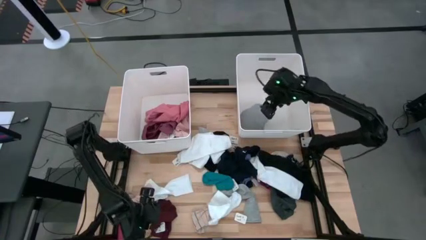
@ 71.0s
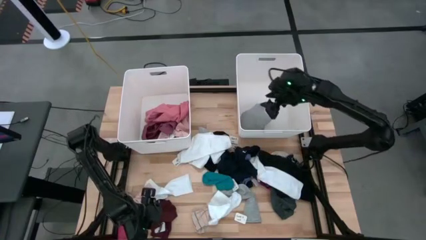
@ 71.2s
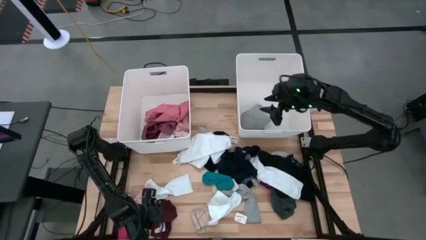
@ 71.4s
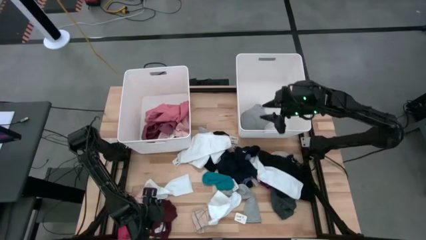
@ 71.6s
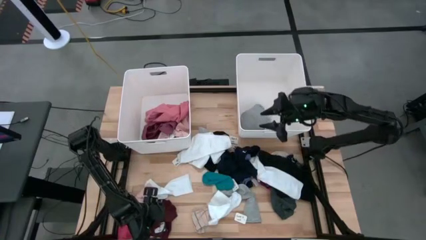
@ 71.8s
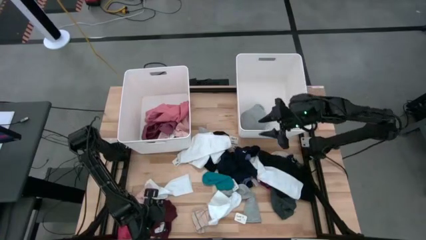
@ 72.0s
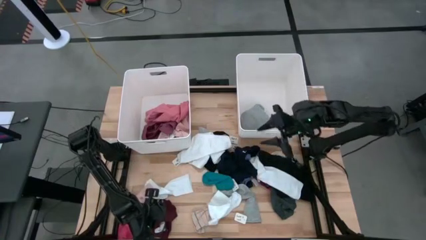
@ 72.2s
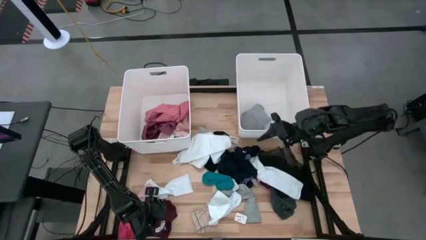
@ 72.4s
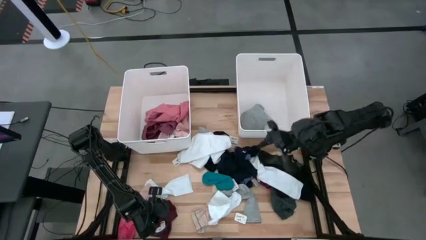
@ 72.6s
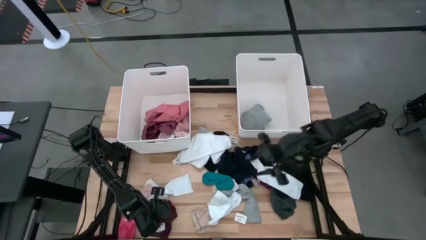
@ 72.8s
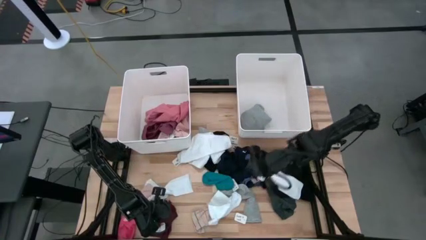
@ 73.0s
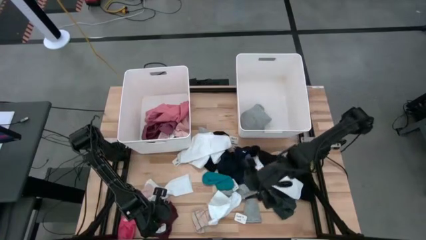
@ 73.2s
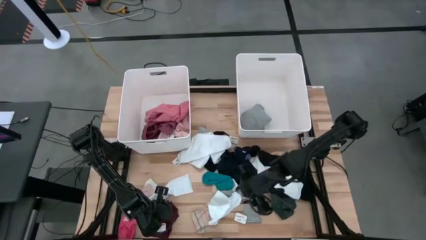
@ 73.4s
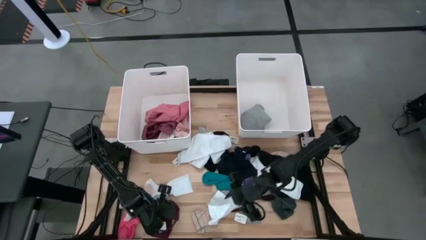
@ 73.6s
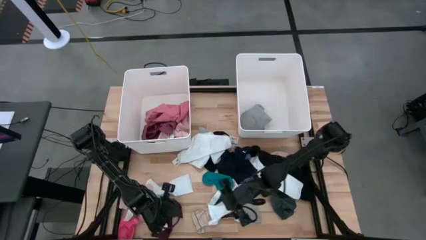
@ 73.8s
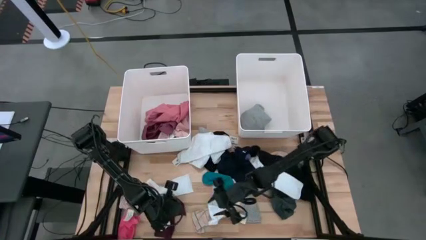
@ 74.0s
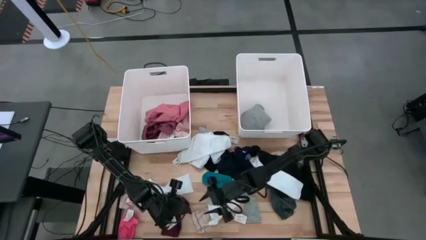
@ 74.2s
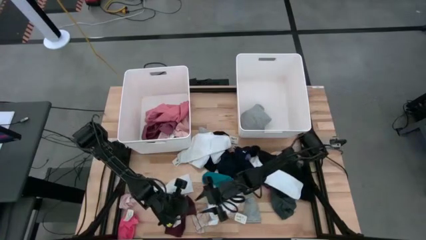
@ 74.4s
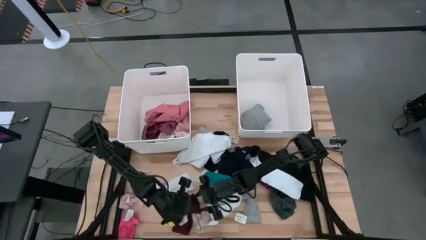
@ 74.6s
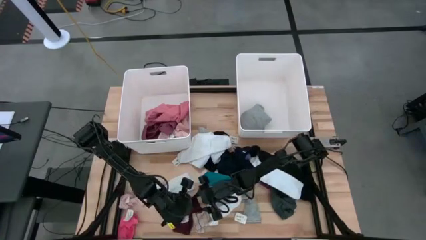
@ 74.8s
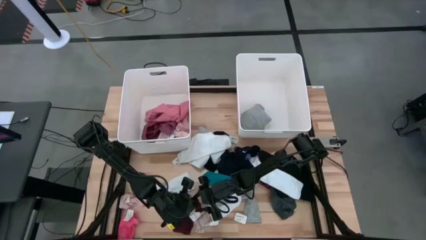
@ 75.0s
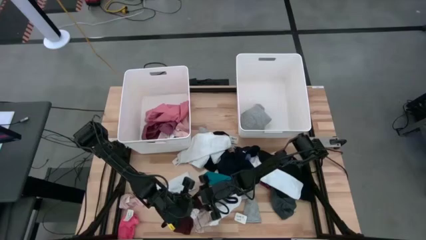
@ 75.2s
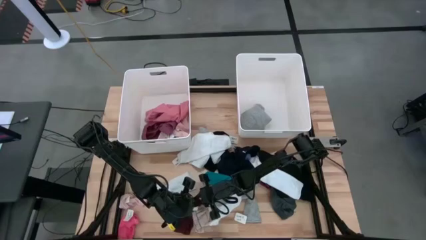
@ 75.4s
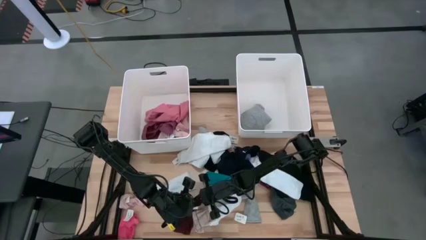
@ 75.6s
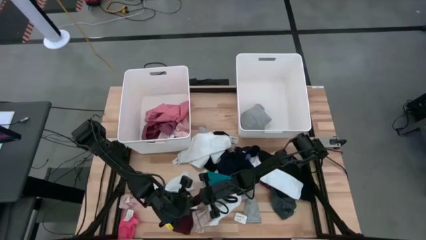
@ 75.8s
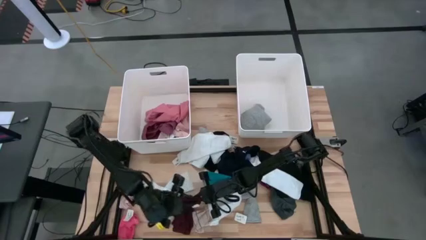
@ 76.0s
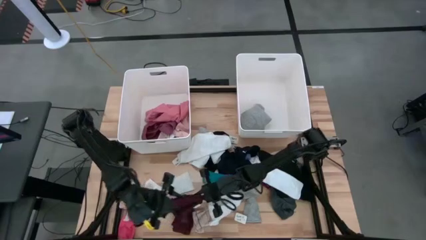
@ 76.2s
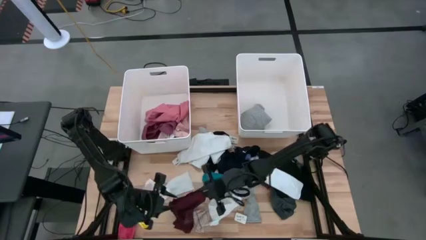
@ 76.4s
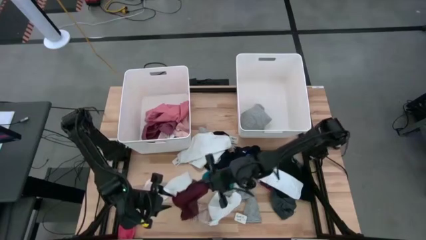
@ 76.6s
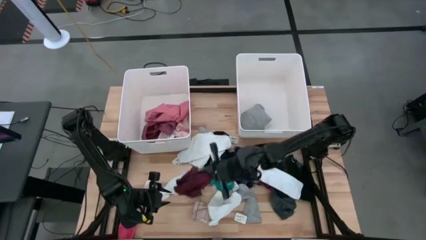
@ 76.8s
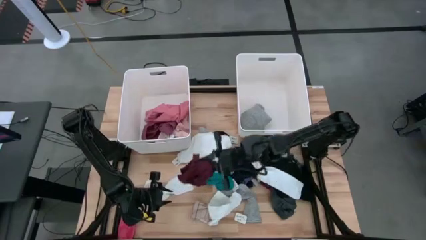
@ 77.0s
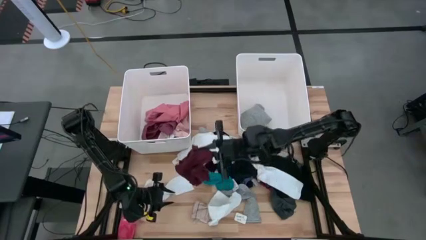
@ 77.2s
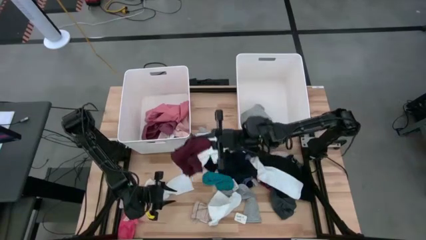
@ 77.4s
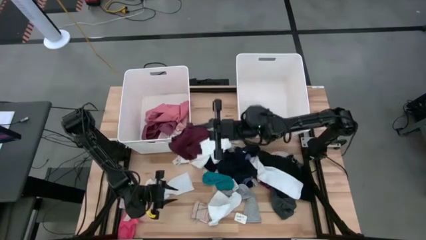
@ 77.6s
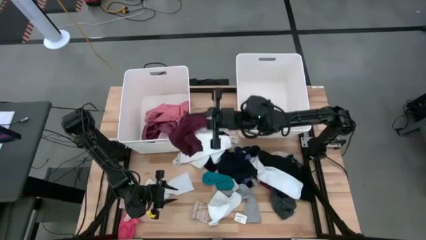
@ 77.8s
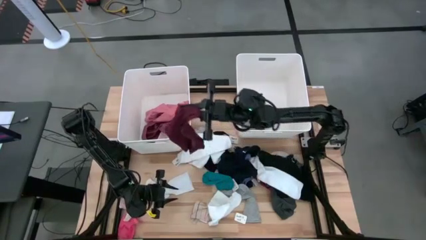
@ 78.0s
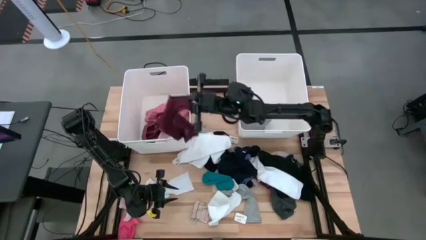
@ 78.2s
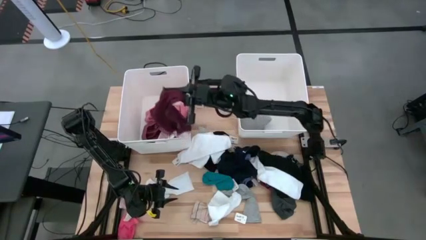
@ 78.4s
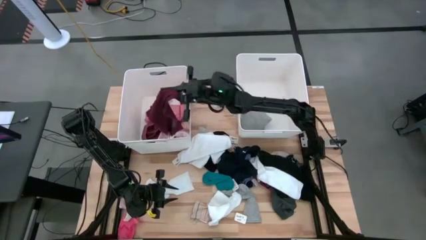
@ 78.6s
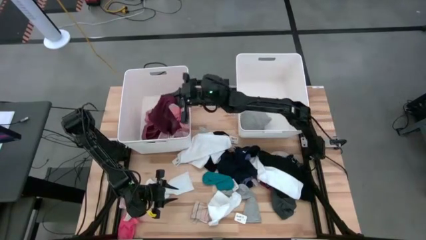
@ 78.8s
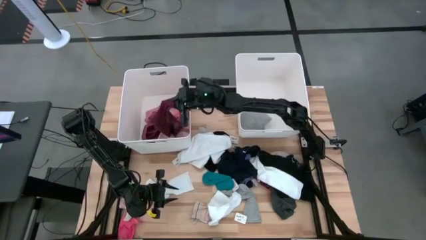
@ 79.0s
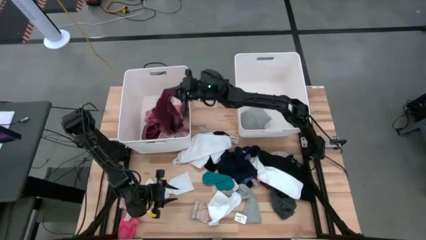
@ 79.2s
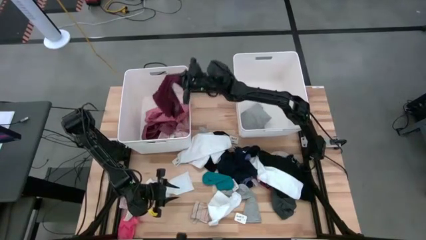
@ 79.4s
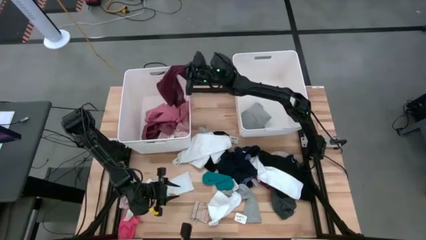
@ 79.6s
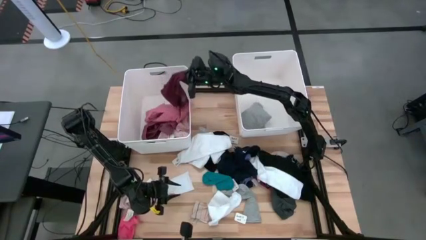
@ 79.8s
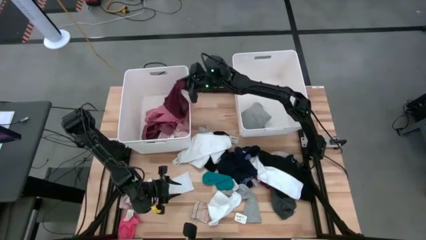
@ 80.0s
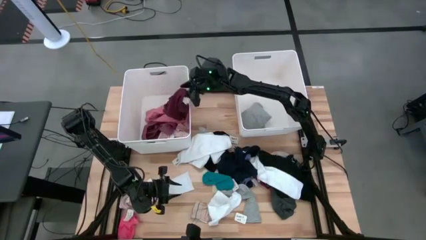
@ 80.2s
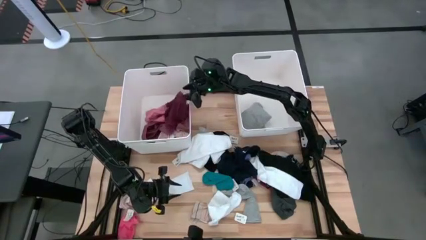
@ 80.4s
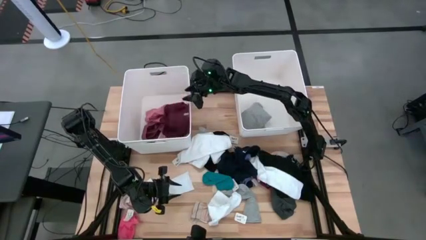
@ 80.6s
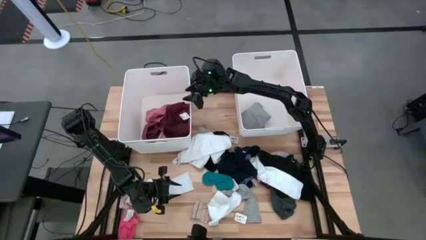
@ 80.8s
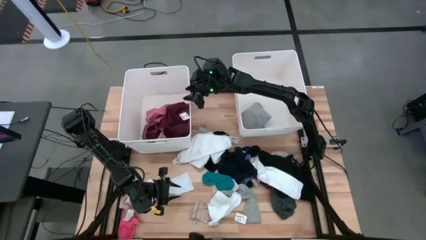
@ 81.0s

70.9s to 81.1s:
Task: Sort clothes
Put the dark red underwear into the left white bin

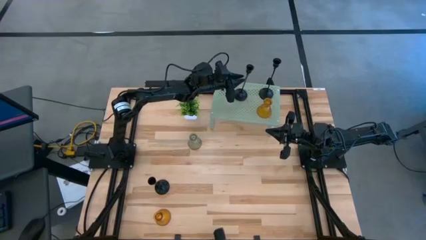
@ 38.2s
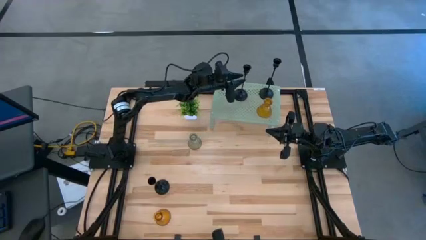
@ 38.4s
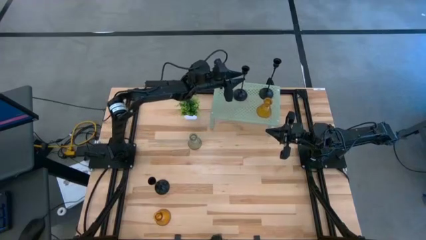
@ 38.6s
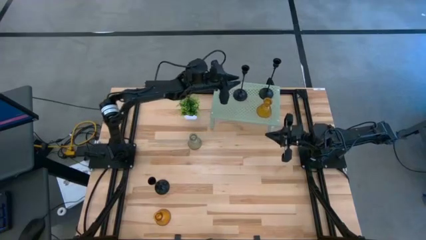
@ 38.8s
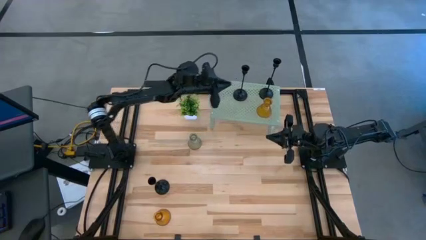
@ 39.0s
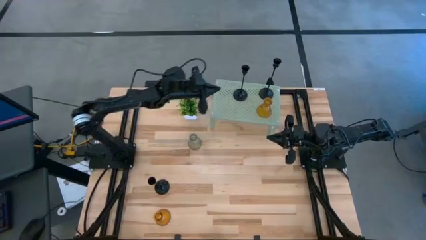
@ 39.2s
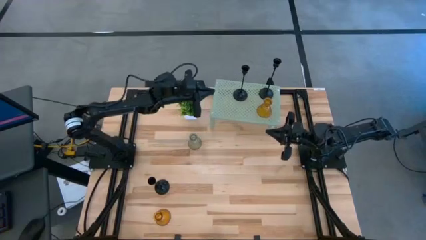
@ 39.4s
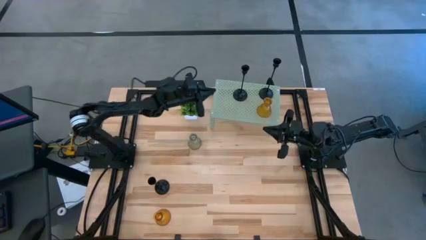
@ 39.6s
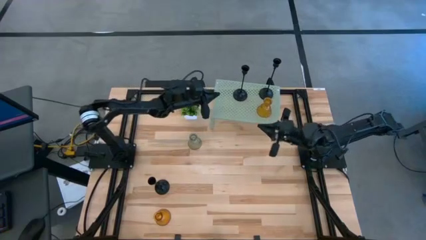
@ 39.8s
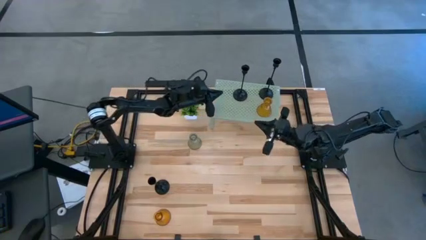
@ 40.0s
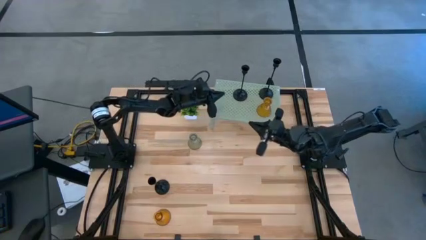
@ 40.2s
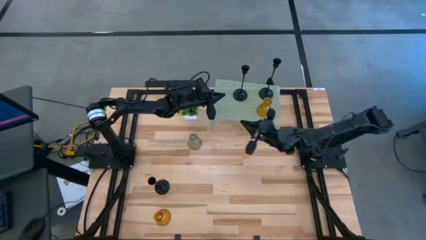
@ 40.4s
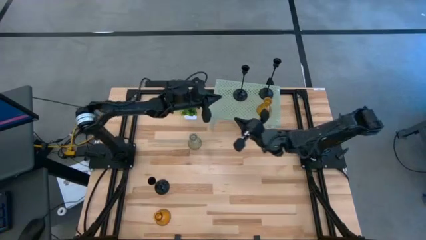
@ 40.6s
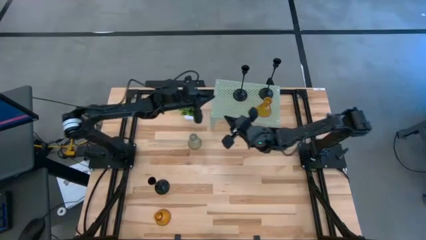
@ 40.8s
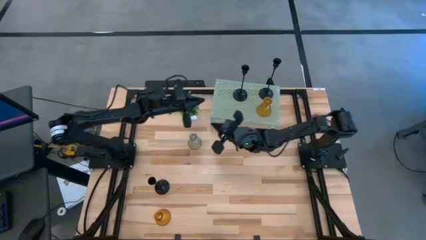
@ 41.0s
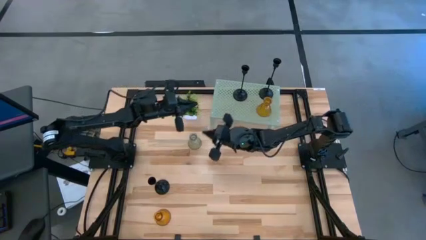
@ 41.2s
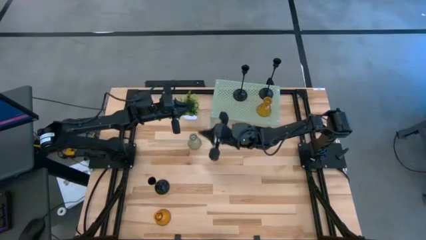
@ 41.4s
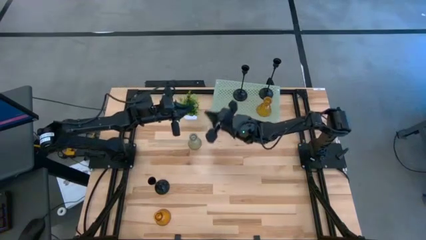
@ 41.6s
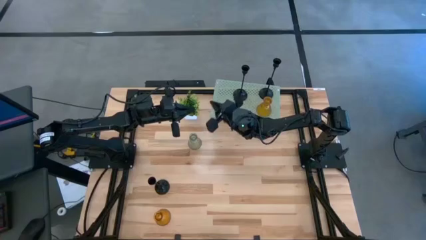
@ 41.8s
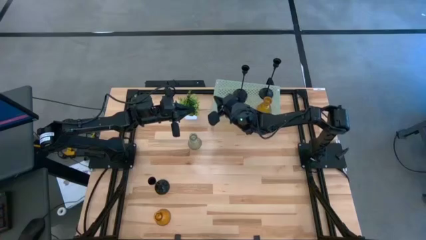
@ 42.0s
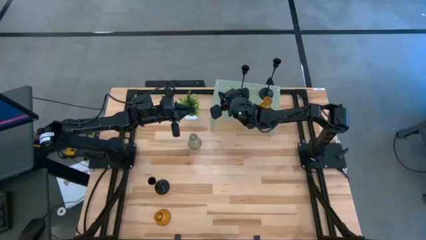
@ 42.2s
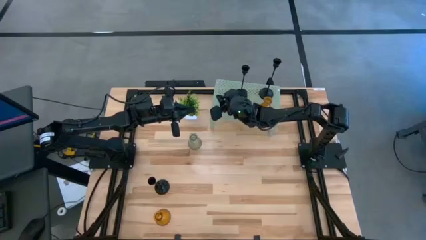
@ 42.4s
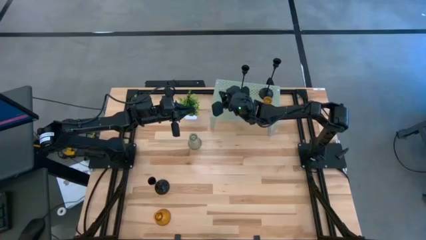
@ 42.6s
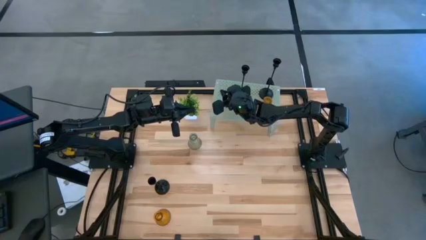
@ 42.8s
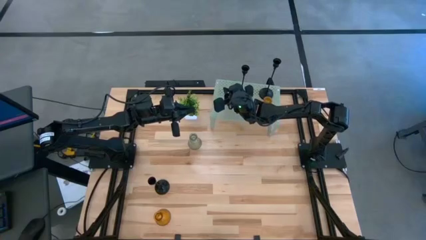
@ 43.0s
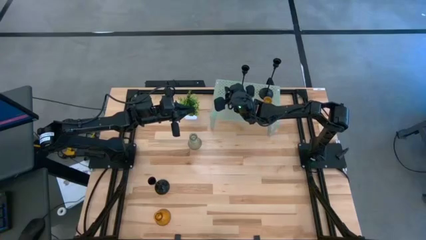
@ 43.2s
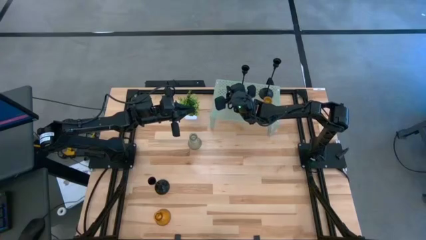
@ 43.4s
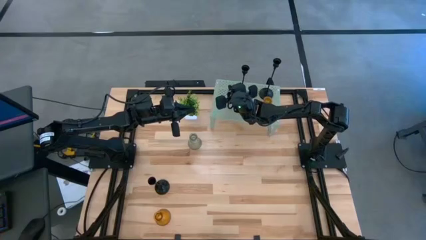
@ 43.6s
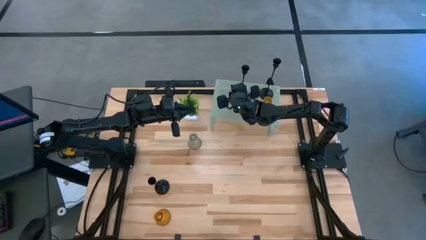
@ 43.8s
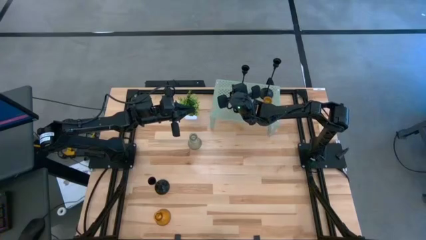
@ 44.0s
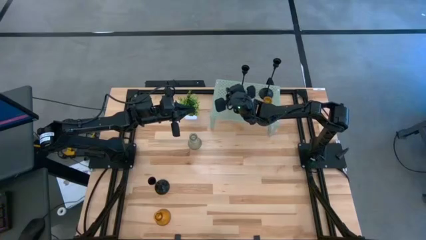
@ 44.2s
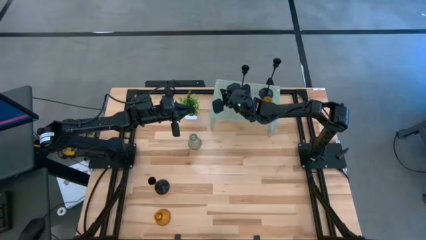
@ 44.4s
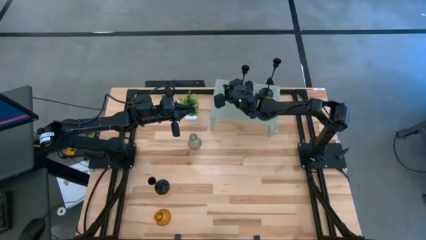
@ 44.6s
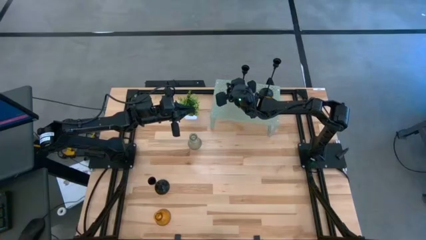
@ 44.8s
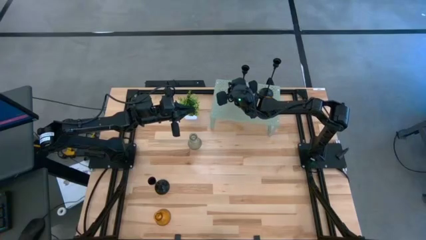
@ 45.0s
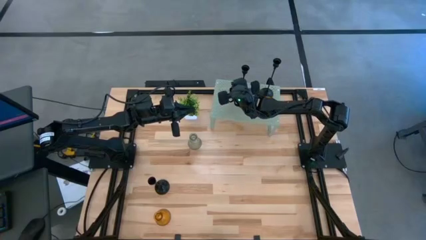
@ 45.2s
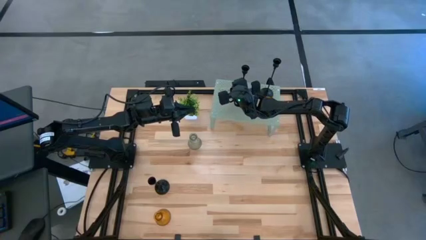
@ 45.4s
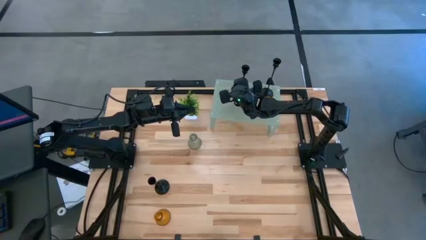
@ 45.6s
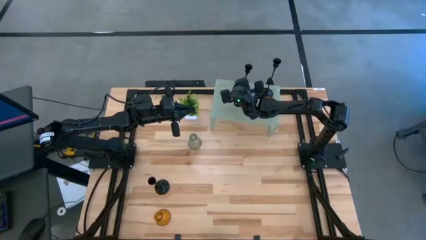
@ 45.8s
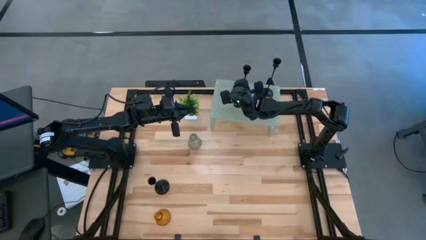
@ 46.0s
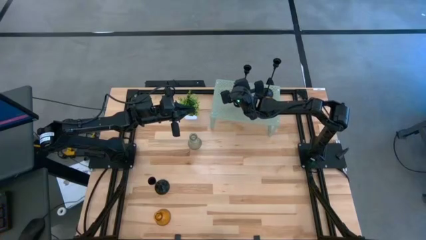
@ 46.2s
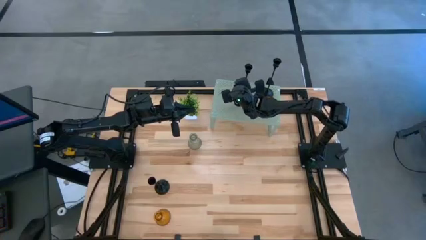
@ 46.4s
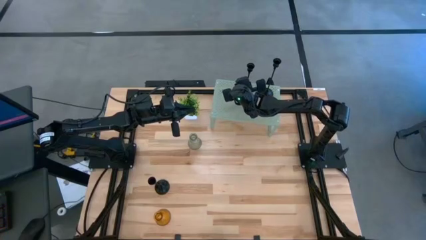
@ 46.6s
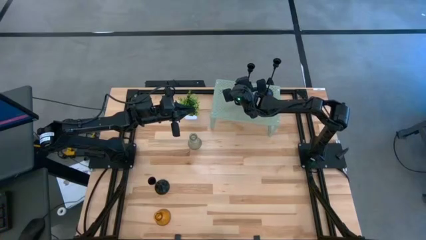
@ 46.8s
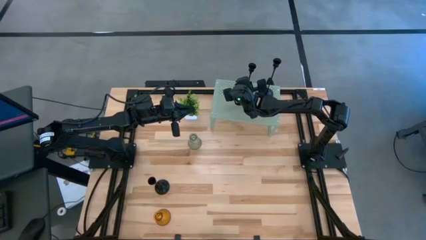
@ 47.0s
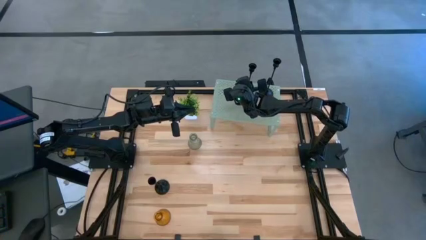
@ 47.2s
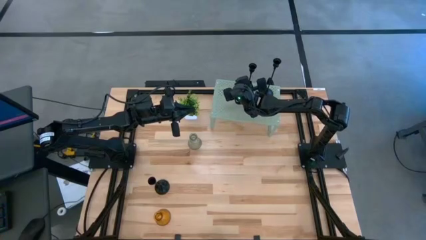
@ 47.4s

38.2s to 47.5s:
Task: Pick & Place candle stick holders
Adjust the black metal candle holder on the shelf
